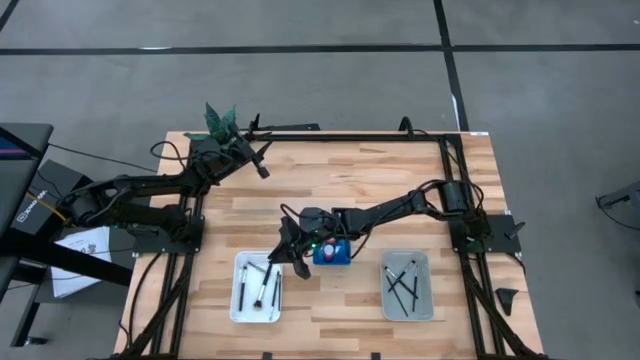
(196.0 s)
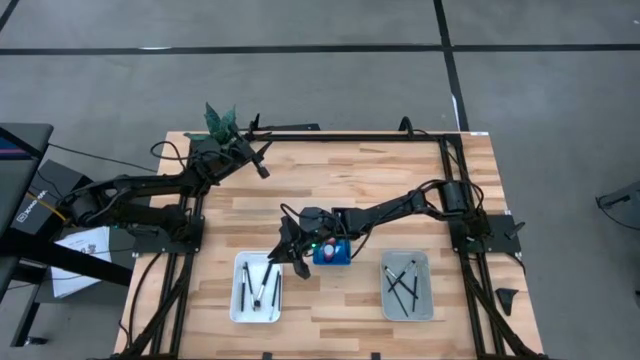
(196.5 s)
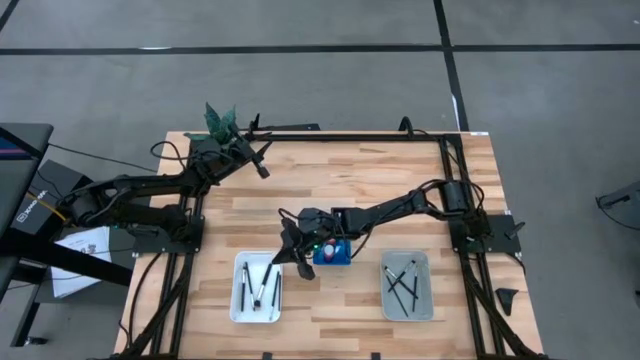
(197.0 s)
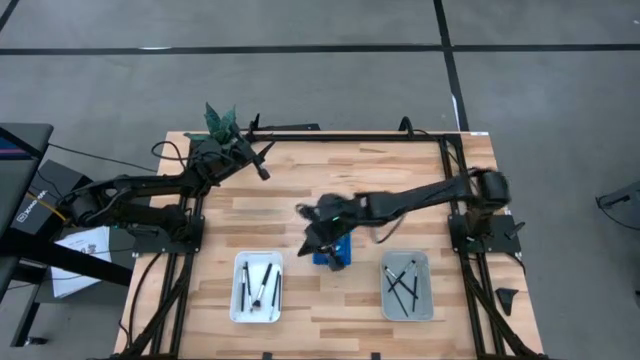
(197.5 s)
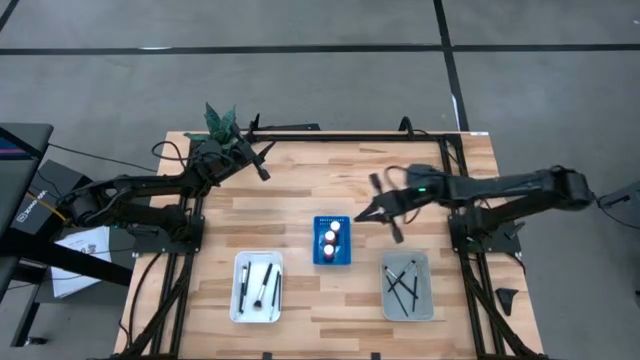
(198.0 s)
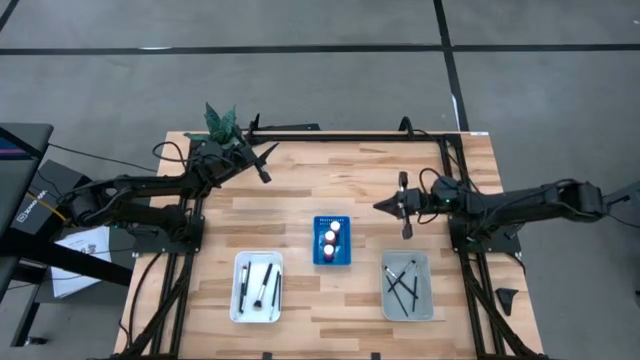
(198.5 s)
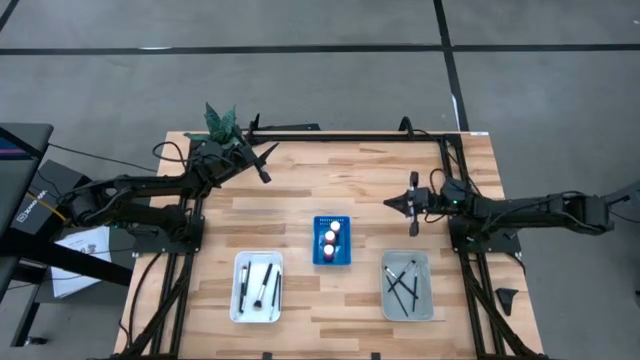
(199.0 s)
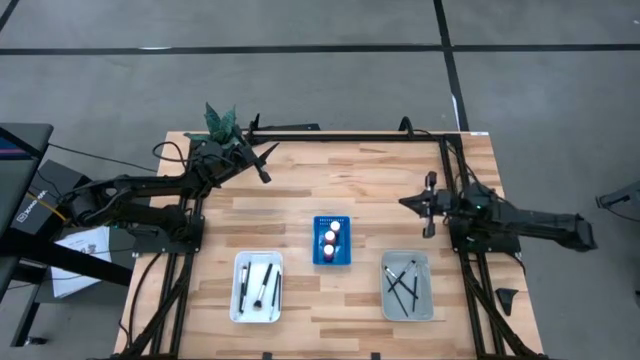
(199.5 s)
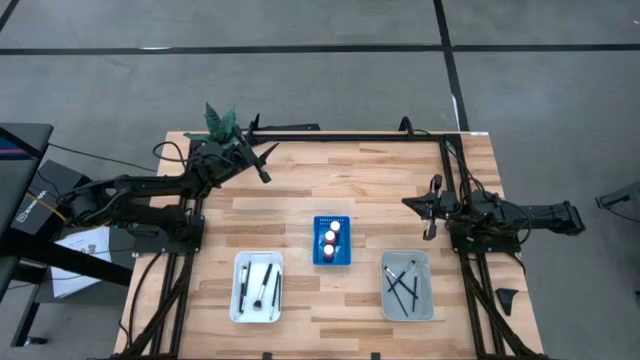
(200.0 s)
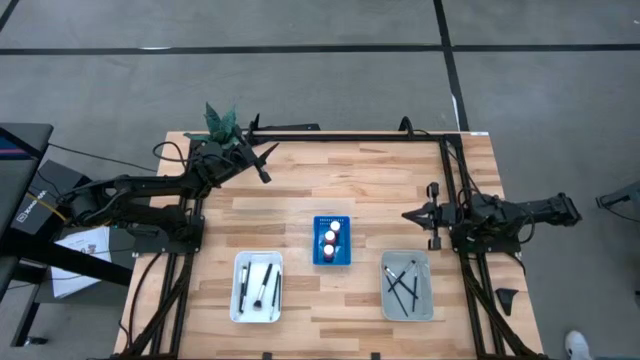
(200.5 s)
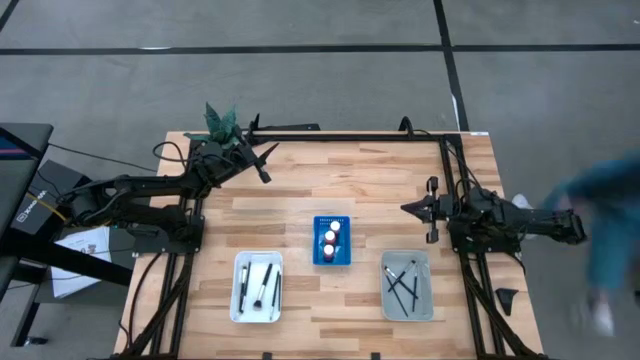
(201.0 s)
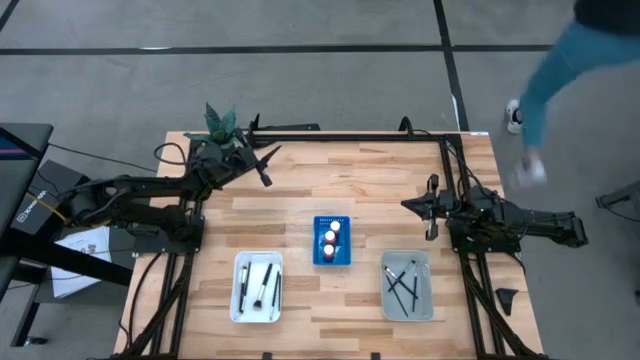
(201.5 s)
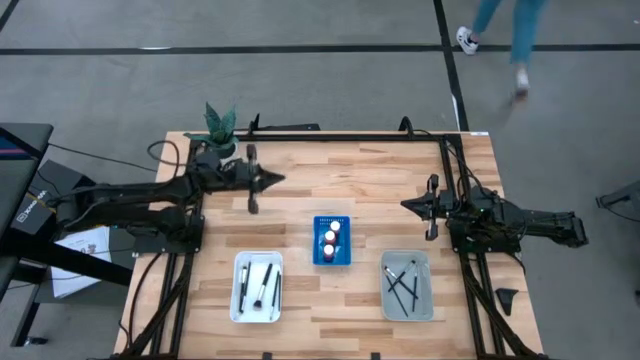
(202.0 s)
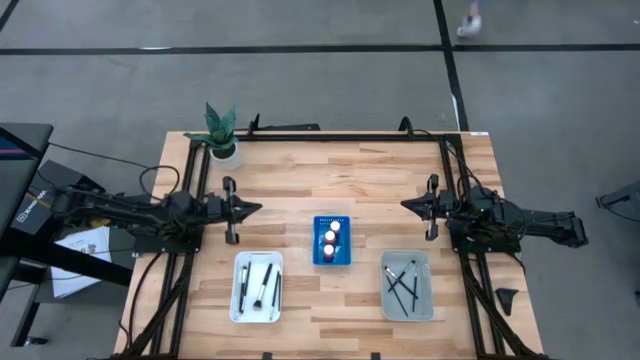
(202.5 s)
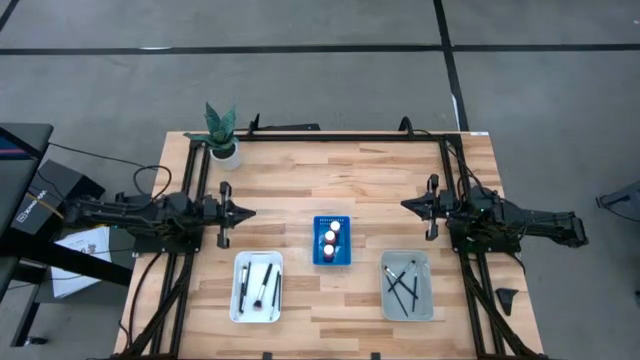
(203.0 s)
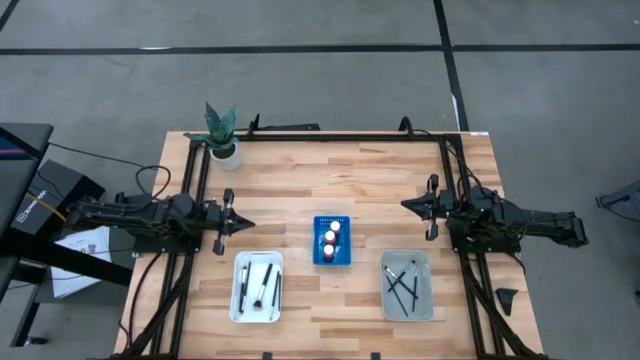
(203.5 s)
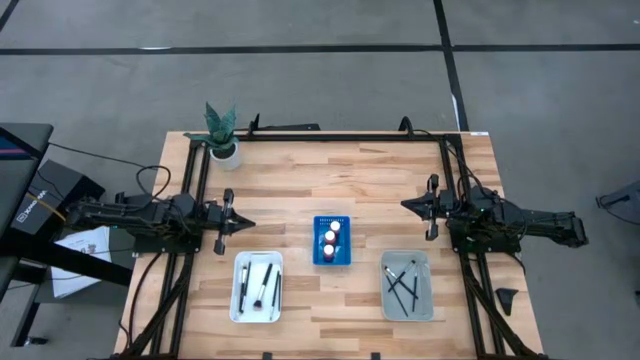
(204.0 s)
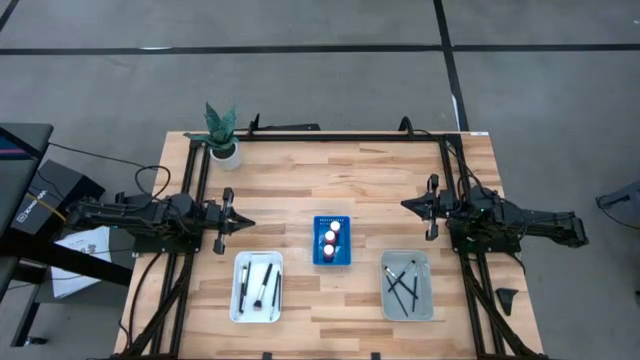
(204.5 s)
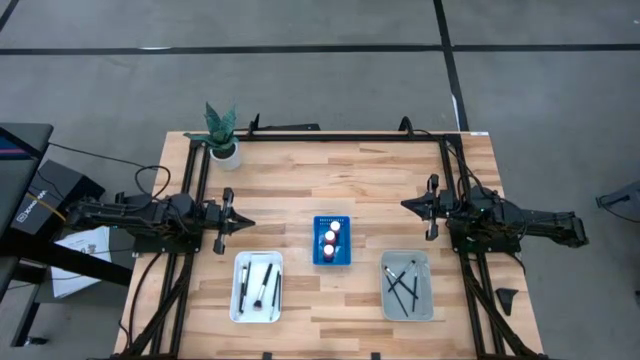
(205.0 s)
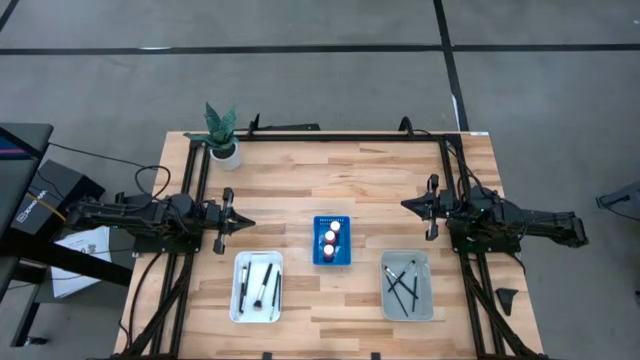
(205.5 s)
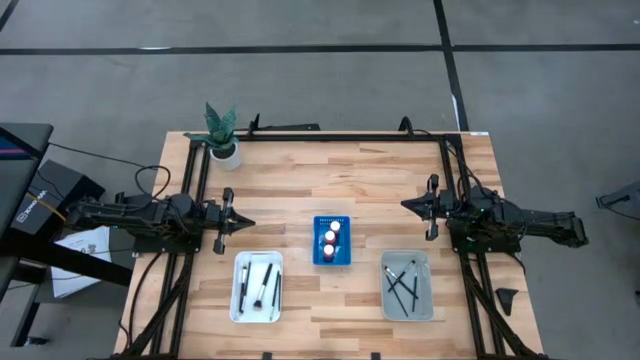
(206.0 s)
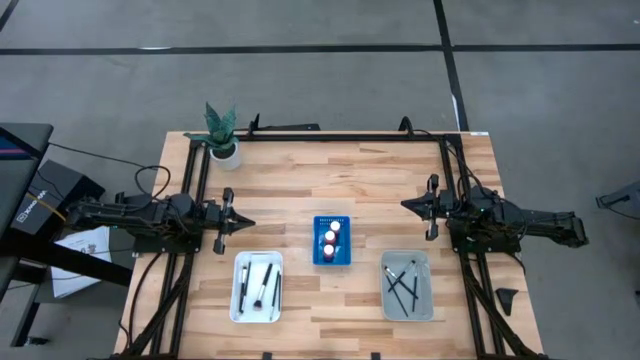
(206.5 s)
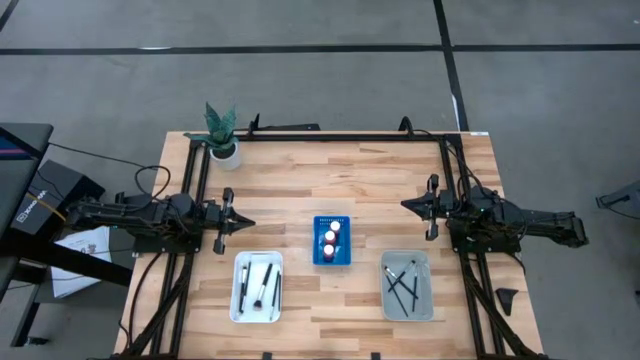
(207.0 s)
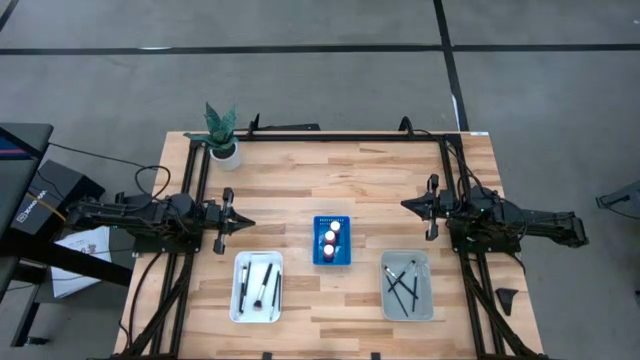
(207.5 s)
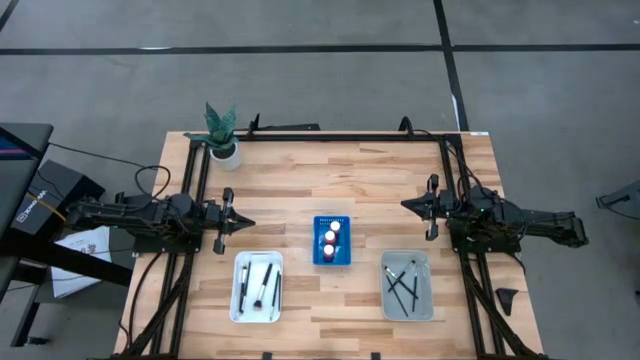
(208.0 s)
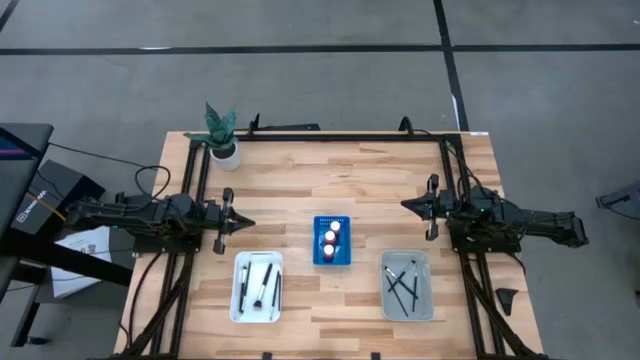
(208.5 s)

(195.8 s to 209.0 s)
Task: Pick & Place Paint Supplies
Return to Home Position

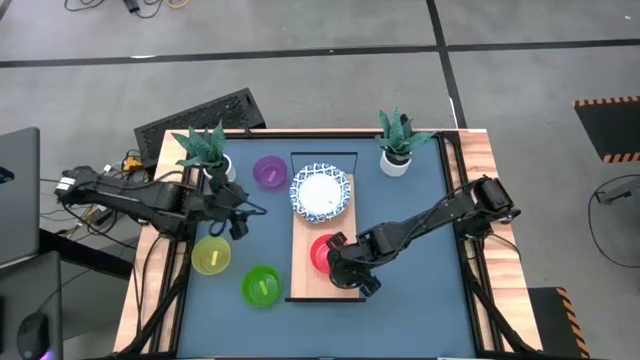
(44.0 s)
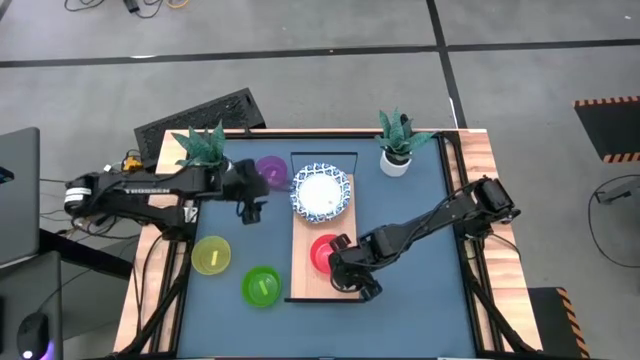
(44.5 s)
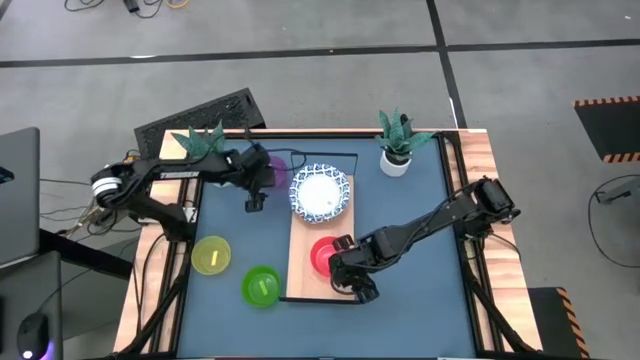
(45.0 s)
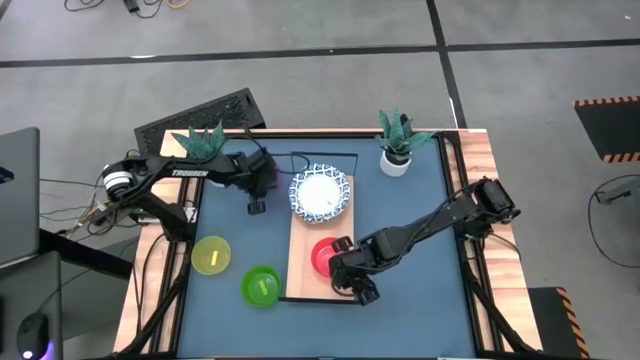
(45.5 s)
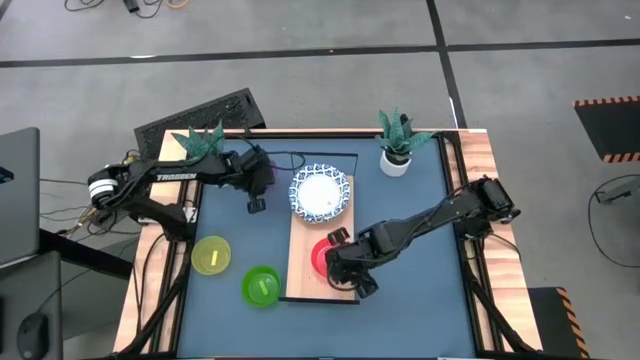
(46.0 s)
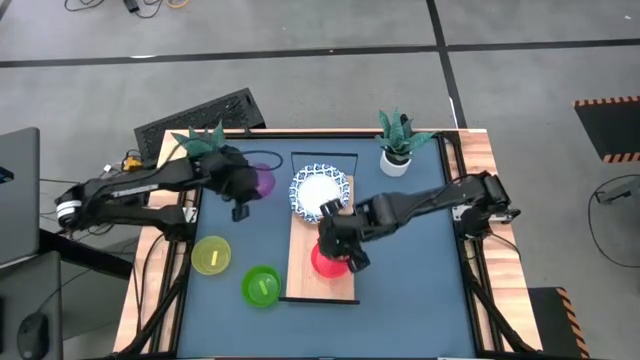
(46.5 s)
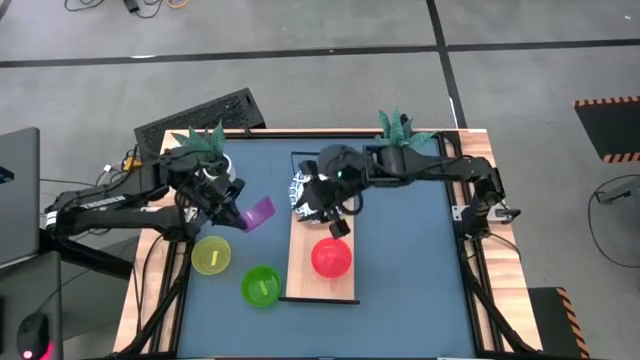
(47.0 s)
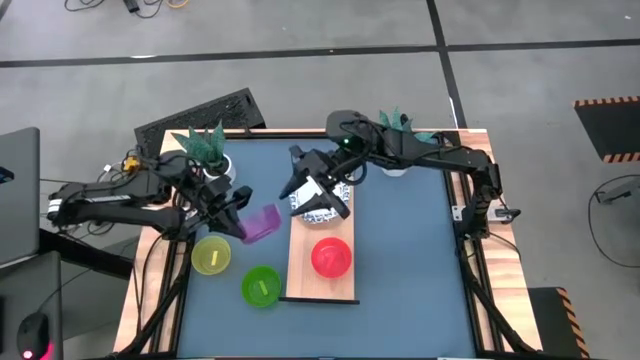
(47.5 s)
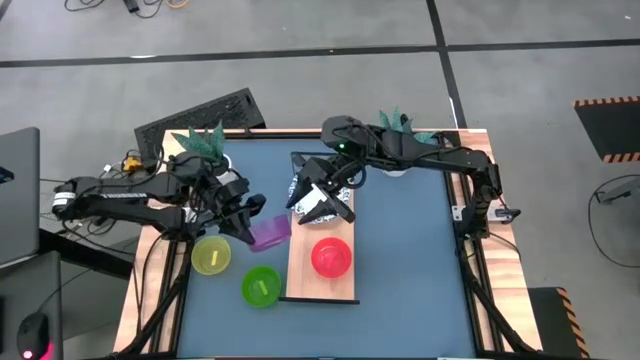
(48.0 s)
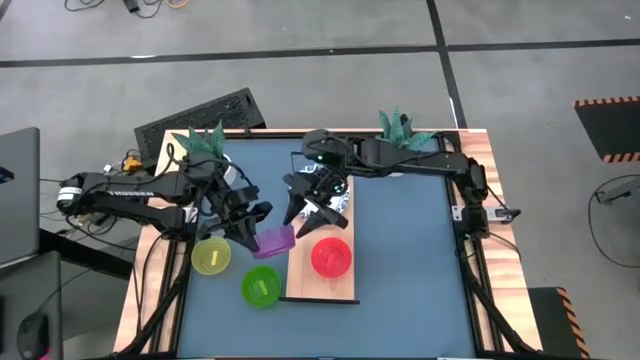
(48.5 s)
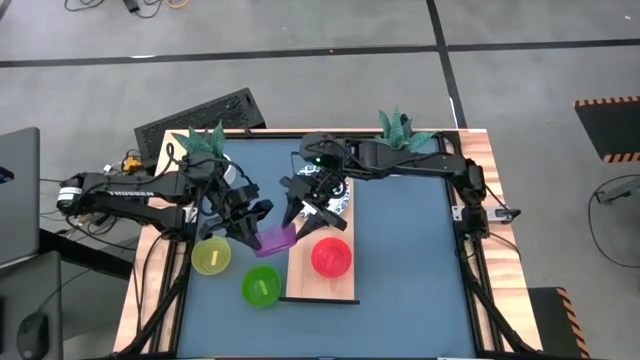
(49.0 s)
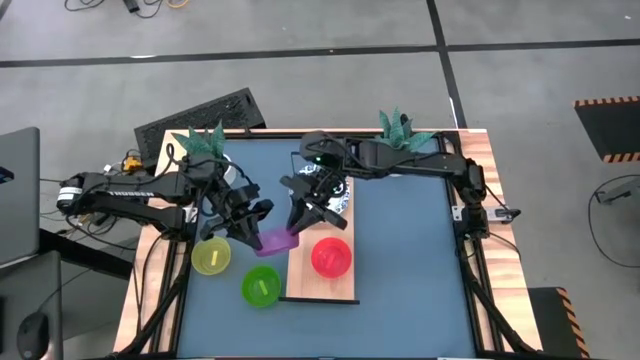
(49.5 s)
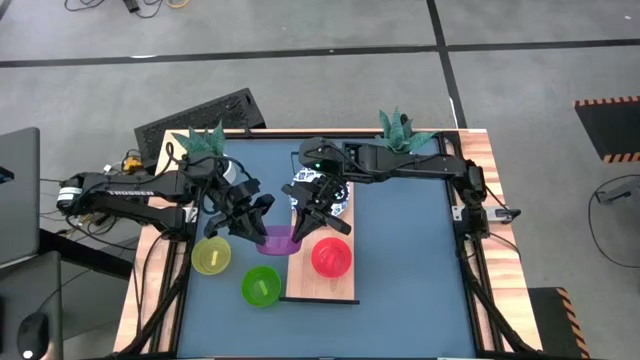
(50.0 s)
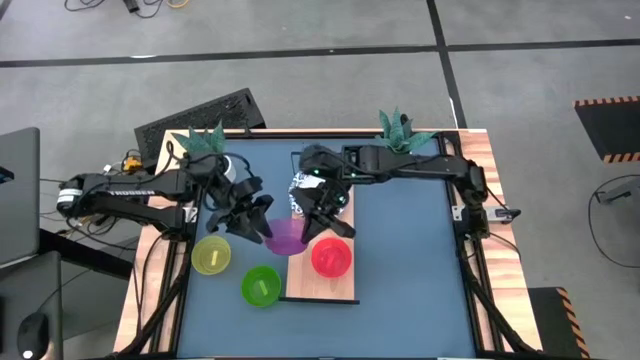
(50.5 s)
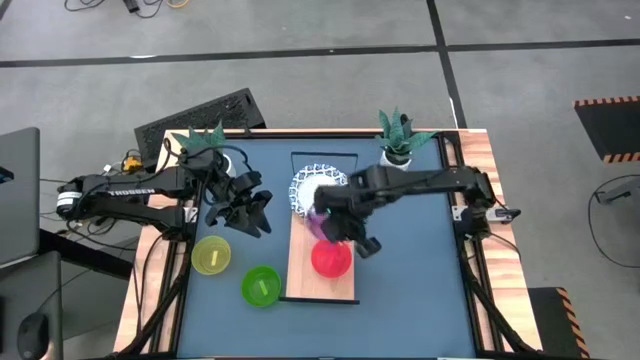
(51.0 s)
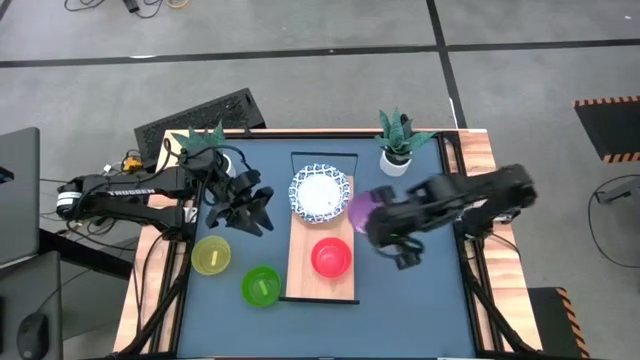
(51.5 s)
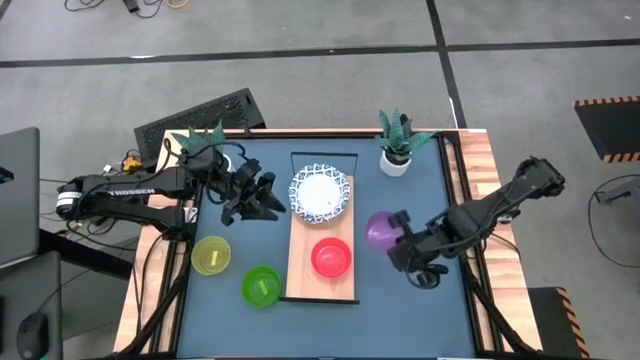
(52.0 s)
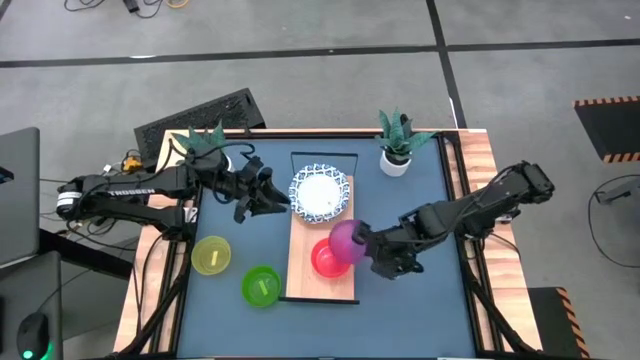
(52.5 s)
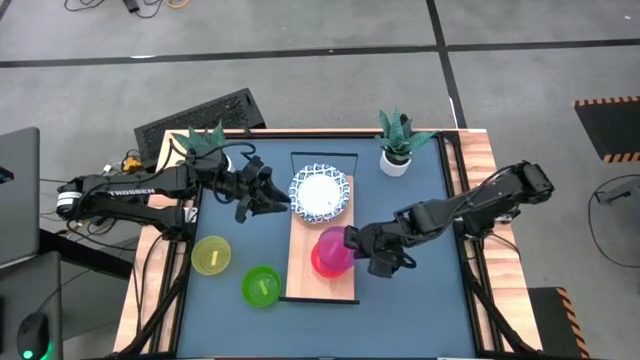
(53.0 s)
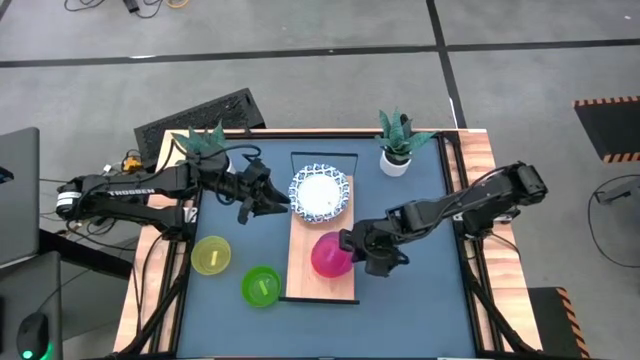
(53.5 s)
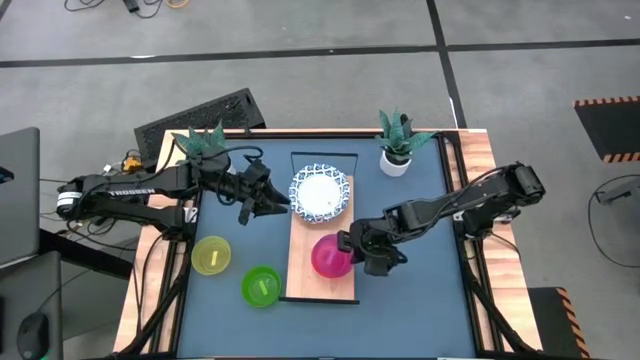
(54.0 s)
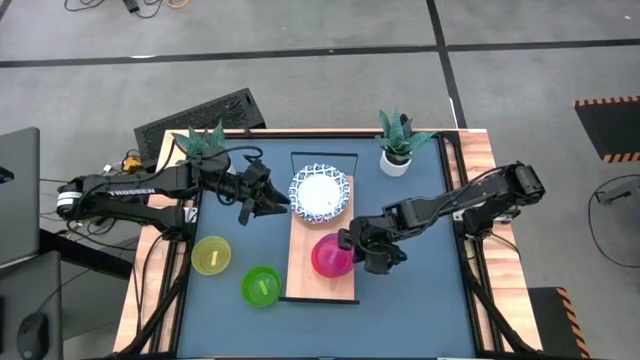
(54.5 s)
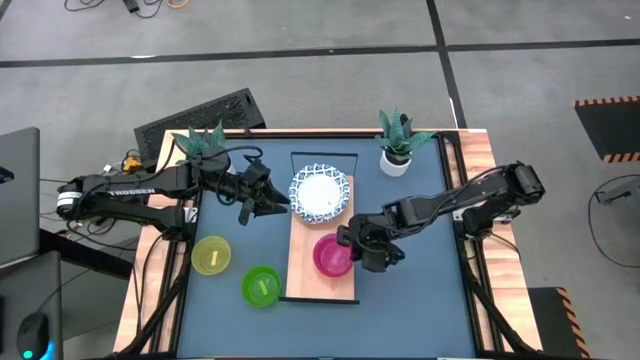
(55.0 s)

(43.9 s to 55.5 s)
Task: Place and stack bowls onto a shelf
Stack the purple bowl on top of the orange bowl on the shelf
